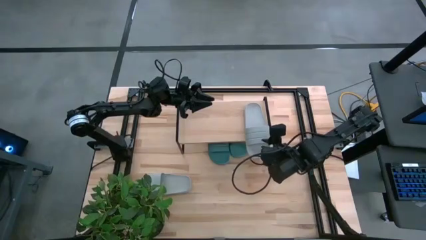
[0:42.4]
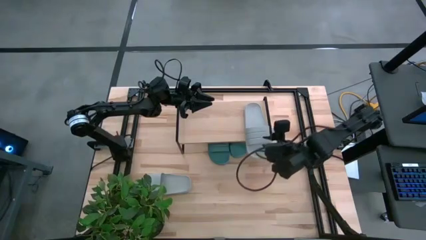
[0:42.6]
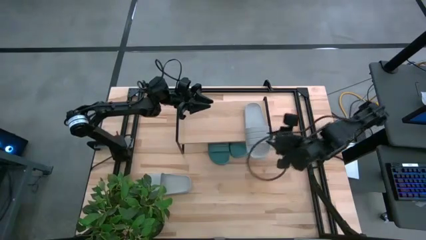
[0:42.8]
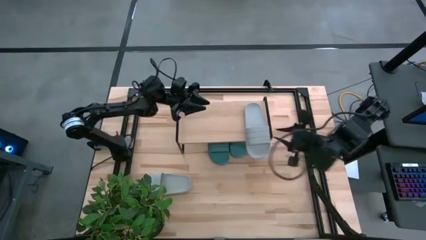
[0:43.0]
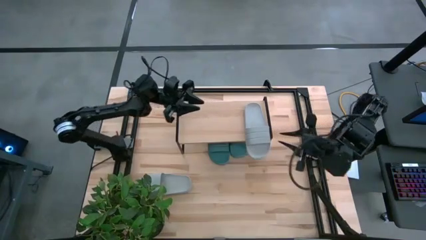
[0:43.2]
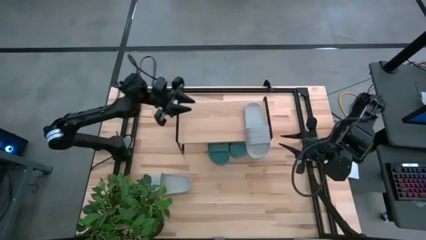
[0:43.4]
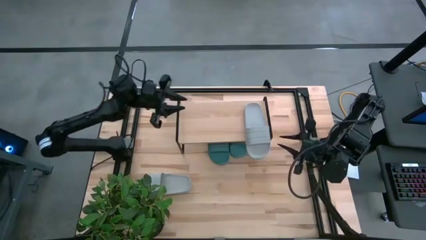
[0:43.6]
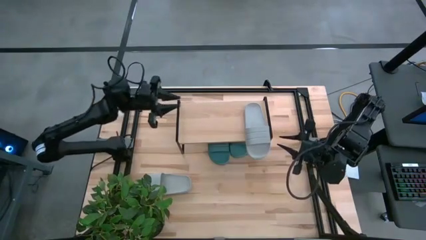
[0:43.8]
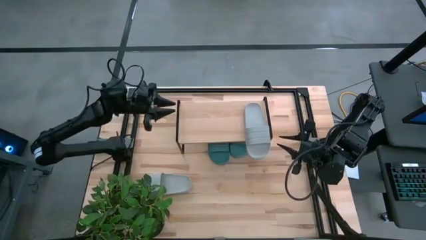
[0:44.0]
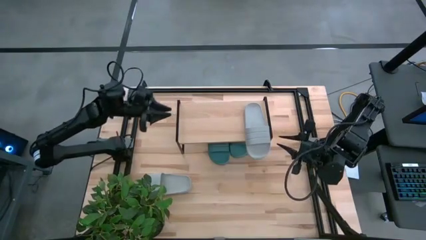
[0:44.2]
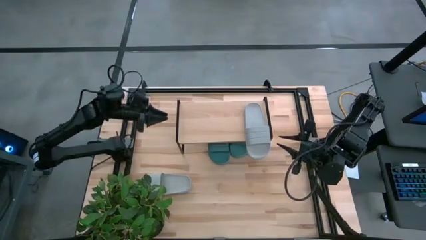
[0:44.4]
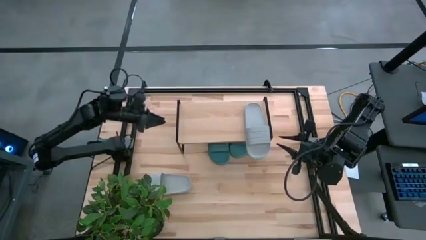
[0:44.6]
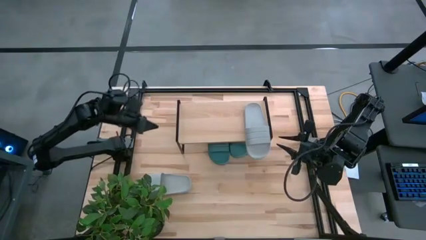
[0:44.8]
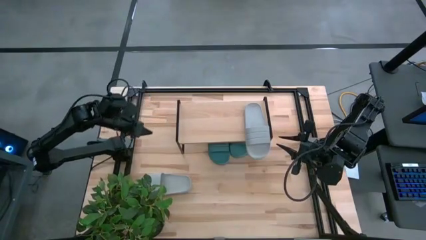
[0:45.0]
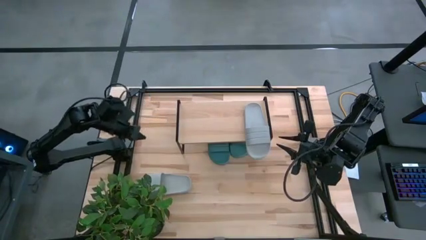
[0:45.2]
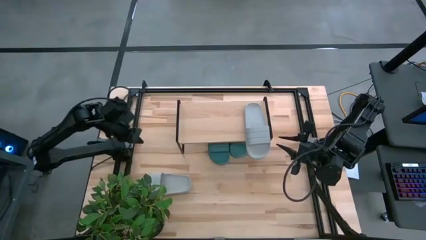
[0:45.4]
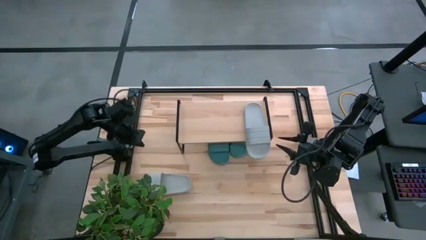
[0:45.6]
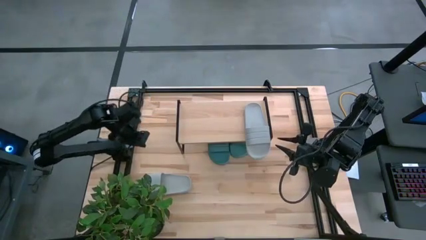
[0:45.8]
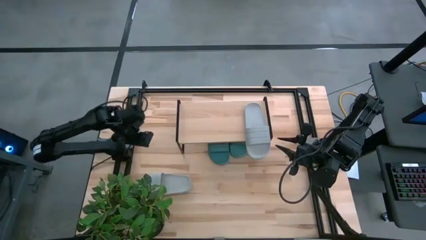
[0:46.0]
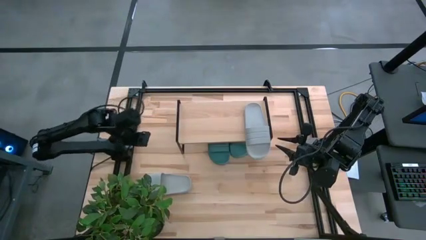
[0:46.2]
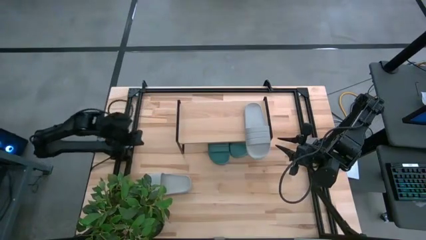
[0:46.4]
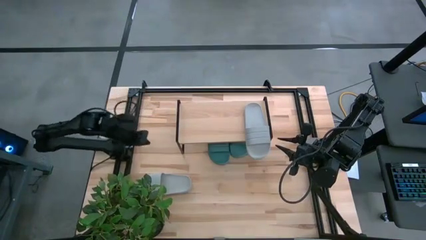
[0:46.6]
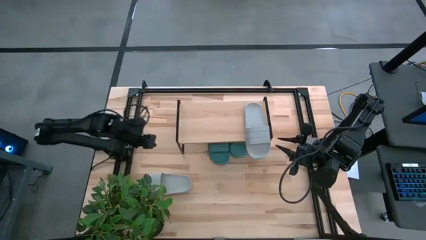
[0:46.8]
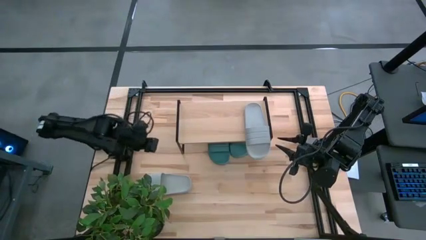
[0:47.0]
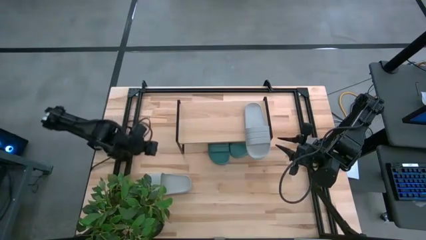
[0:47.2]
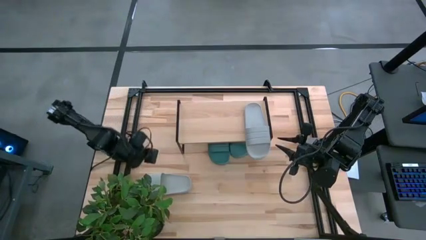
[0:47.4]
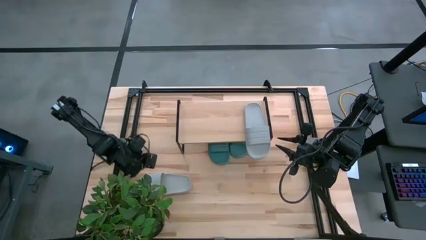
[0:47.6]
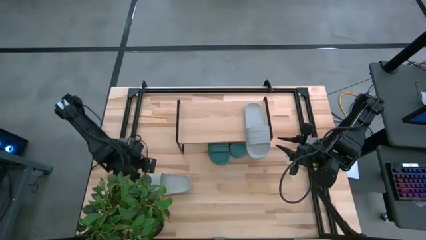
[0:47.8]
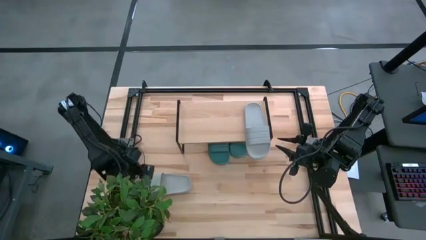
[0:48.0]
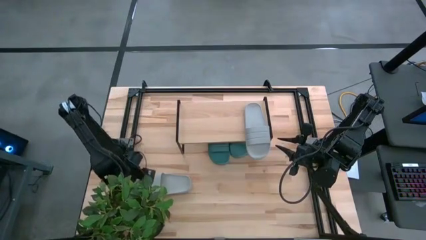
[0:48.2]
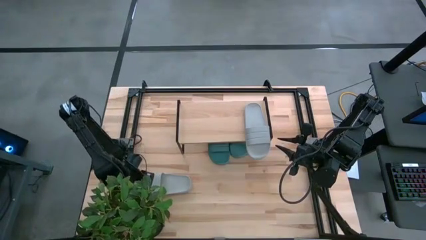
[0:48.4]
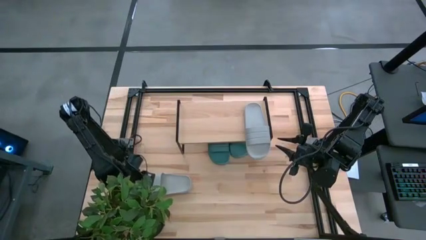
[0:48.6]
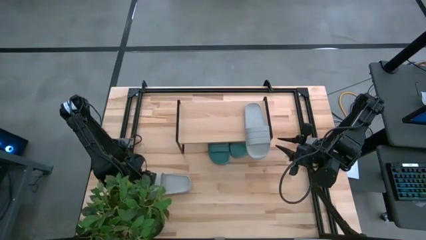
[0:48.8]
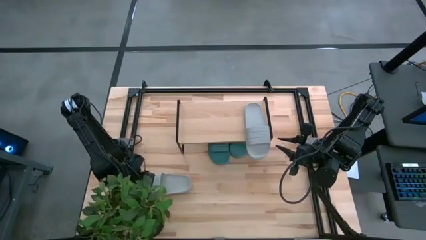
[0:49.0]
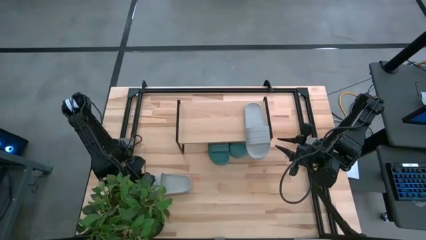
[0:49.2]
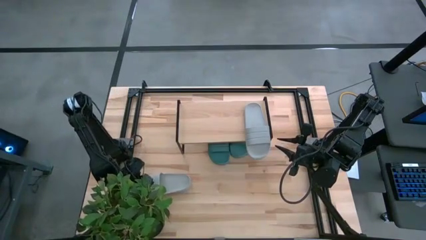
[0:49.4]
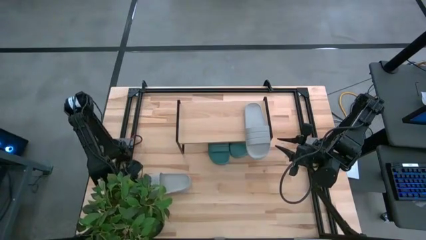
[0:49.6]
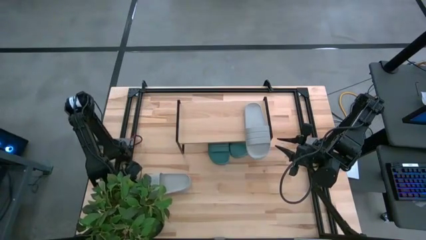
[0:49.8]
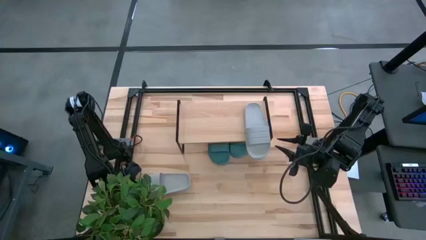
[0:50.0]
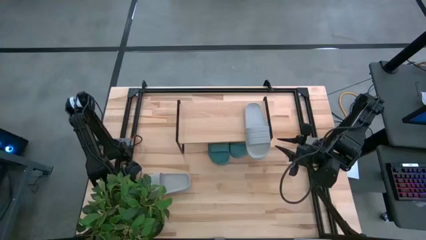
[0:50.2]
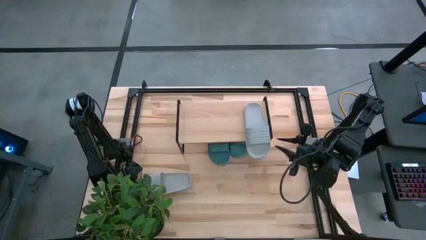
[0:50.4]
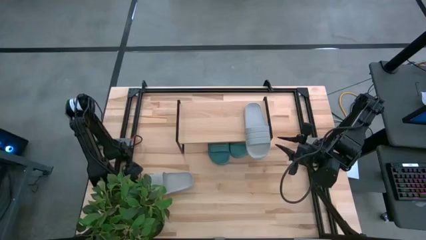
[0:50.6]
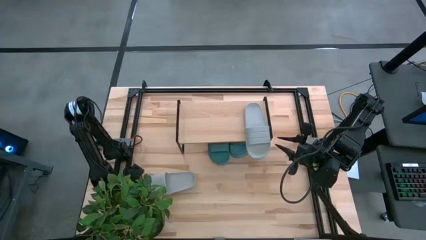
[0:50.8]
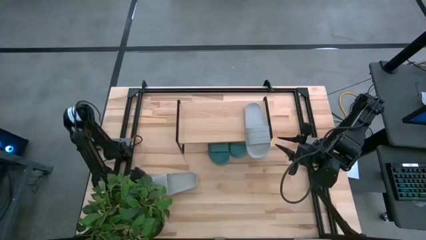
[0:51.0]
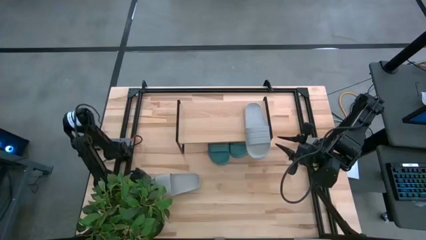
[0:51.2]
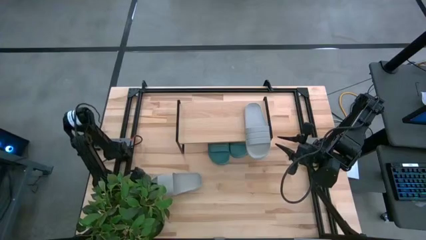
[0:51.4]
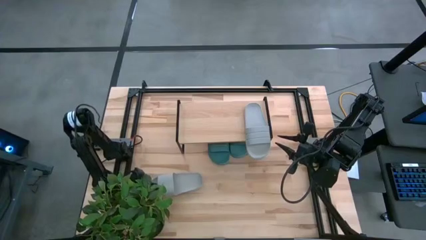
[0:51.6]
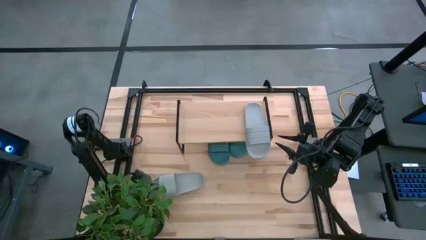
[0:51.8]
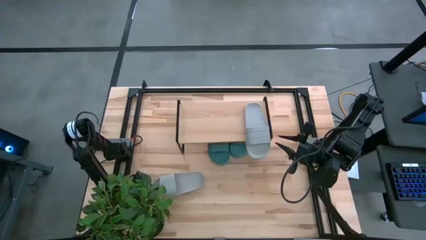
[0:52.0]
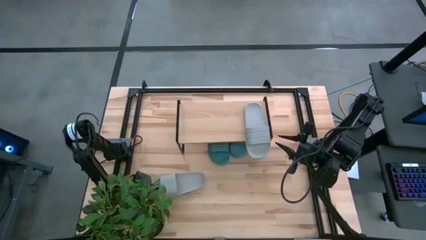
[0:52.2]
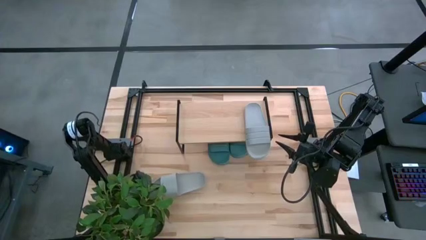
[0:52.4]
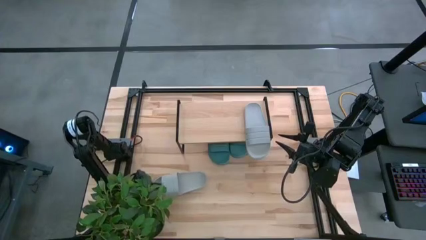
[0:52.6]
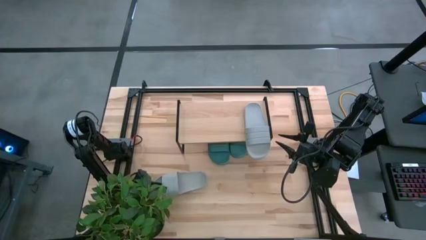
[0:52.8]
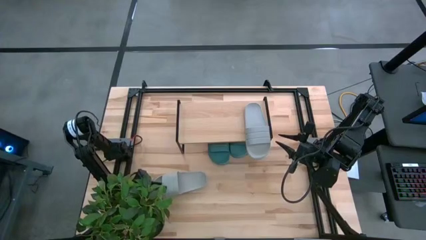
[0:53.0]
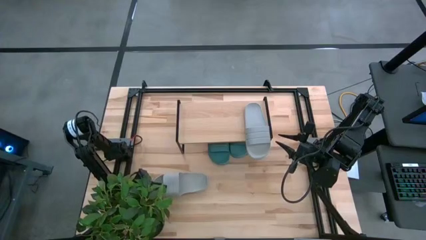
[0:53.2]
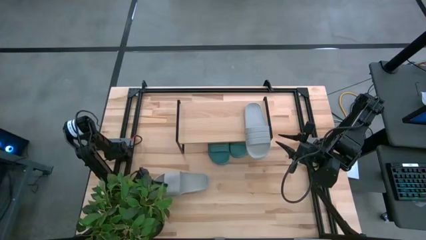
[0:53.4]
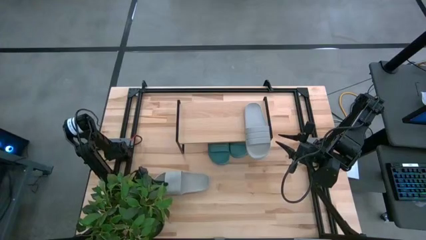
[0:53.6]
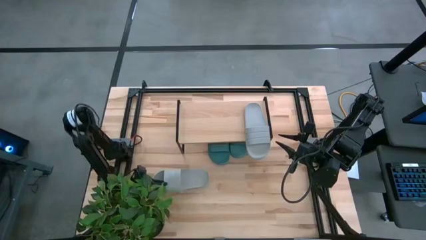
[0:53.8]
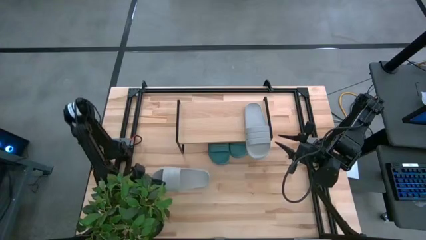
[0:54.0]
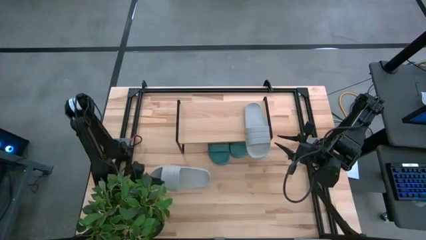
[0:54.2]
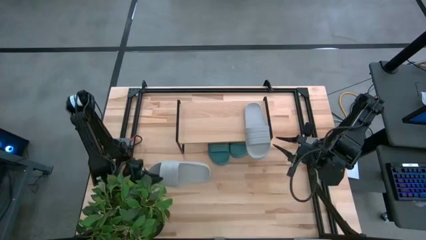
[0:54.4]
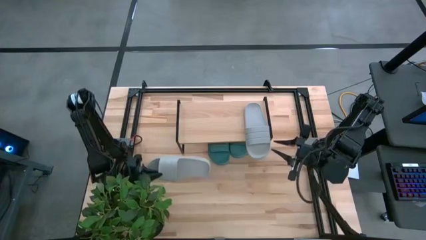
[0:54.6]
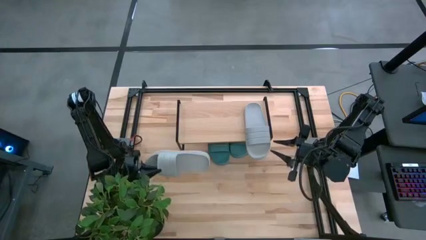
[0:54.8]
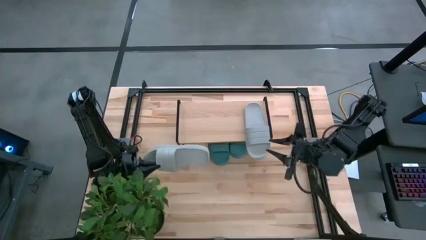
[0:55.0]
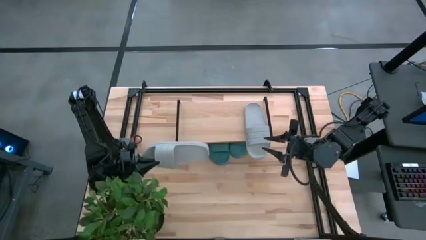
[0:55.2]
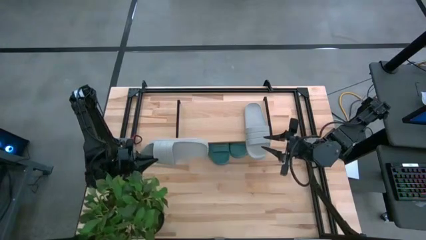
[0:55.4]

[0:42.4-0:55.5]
Task: Pick and place slides into the shelf
Put the gray slides on the shelf

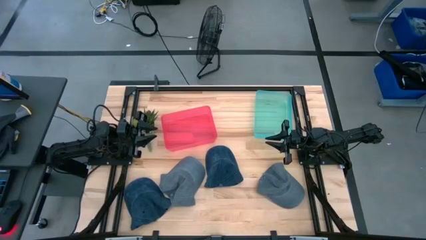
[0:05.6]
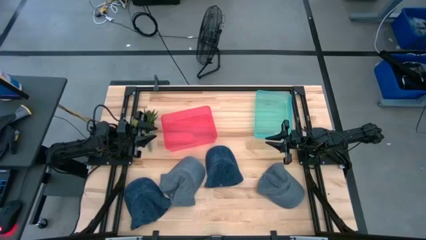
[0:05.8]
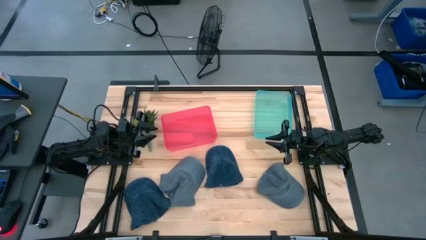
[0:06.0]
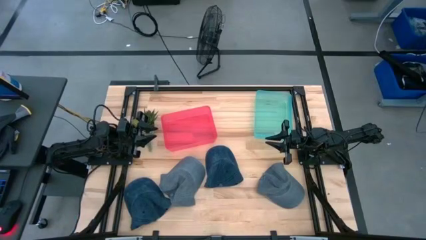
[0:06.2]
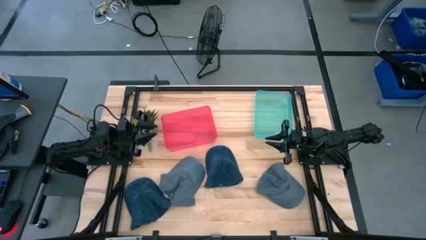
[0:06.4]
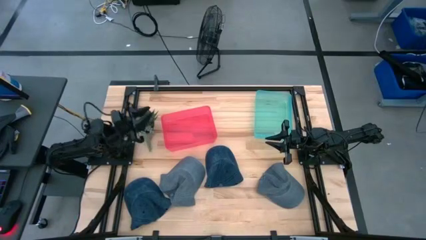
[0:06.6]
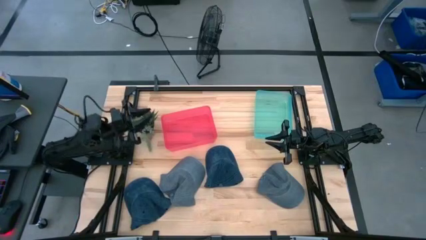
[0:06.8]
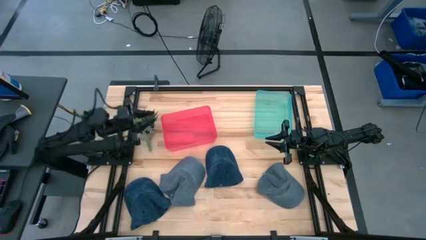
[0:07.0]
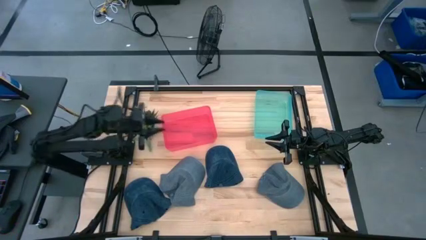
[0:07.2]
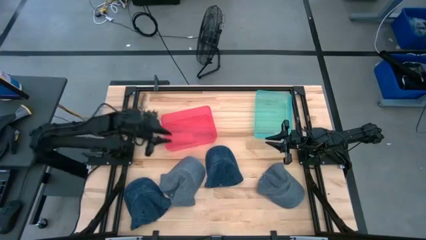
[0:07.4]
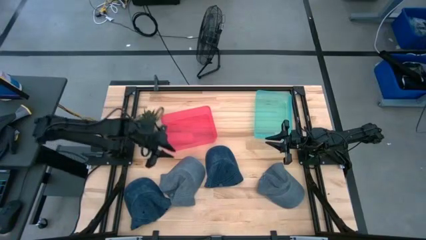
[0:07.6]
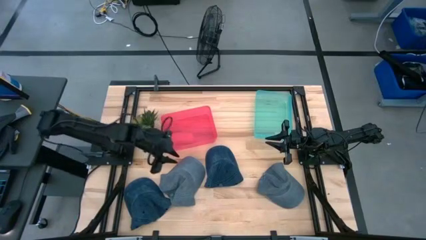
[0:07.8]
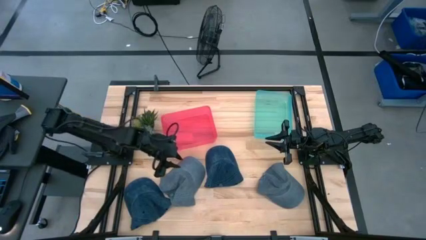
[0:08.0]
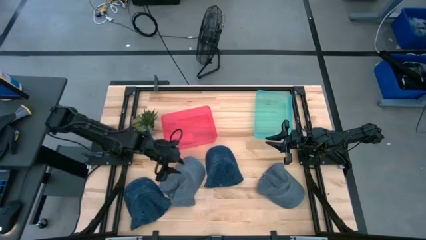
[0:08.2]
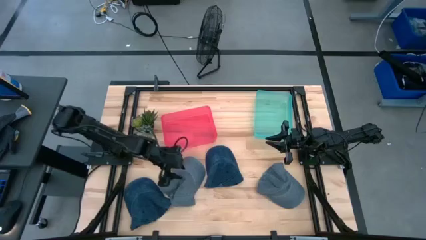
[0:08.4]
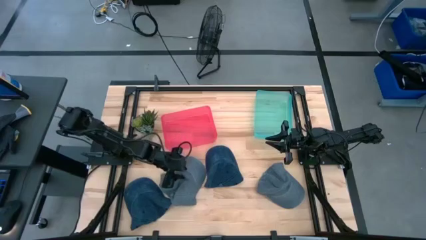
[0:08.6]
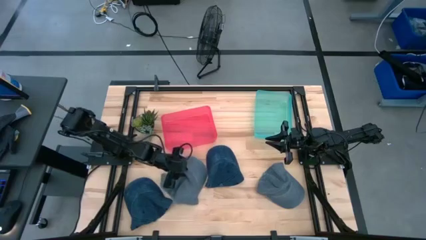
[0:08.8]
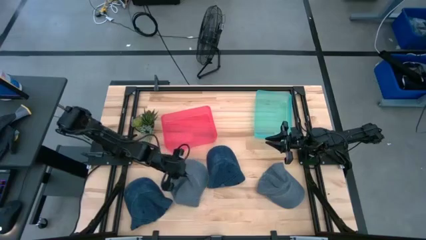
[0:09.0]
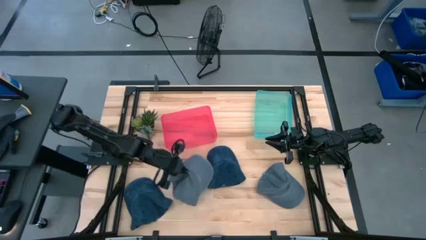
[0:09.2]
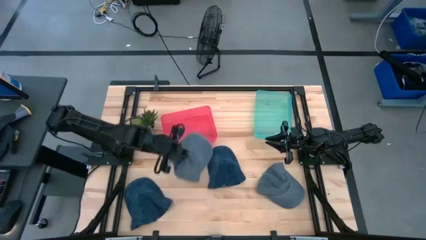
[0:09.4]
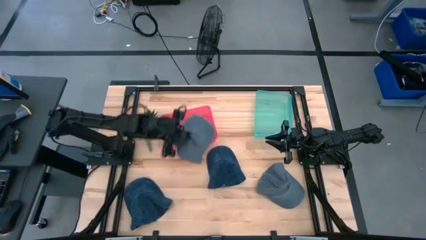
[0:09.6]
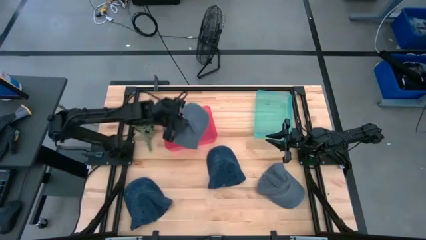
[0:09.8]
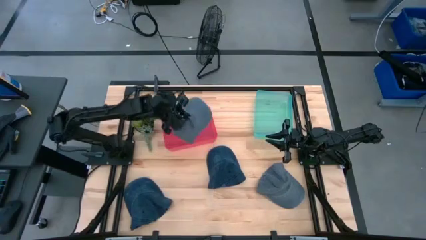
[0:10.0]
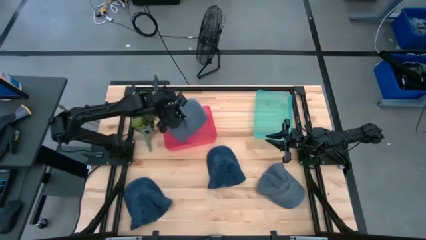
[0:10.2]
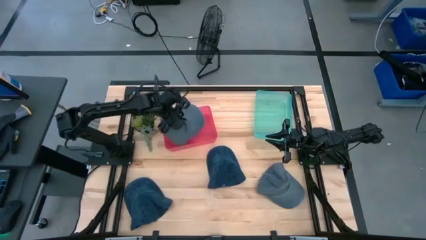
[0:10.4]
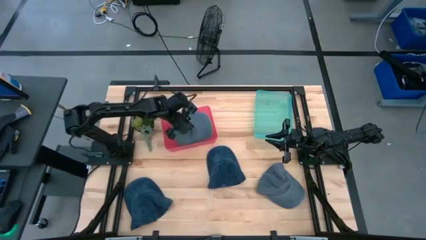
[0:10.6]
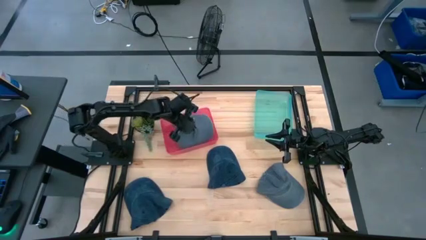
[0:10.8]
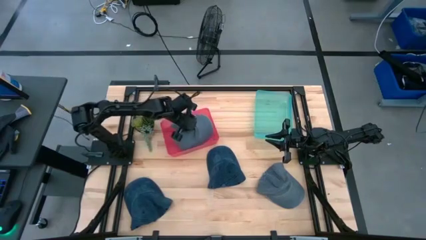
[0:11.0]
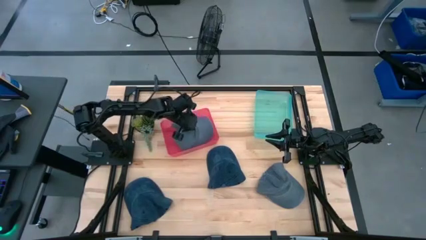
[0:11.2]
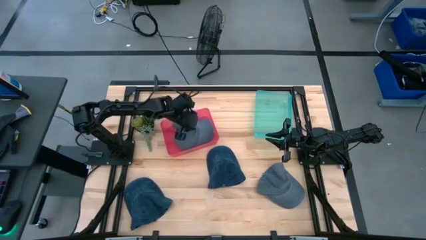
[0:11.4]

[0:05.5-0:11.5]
Task: Pick & Place hat
Put the left gray cap into the red bin
